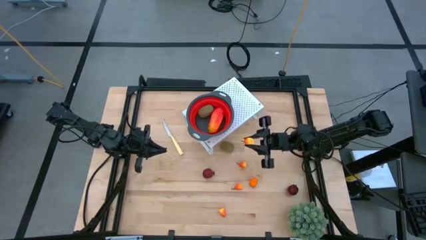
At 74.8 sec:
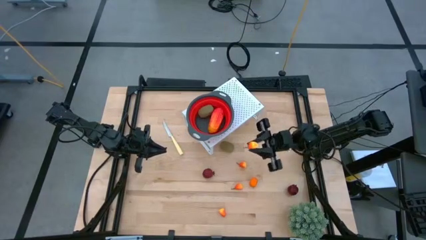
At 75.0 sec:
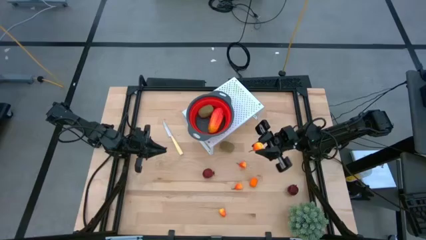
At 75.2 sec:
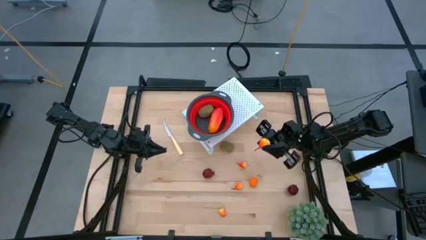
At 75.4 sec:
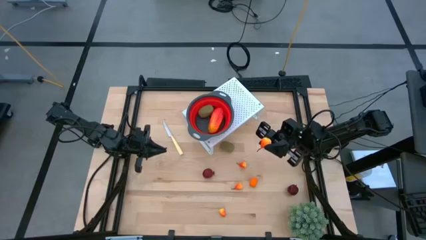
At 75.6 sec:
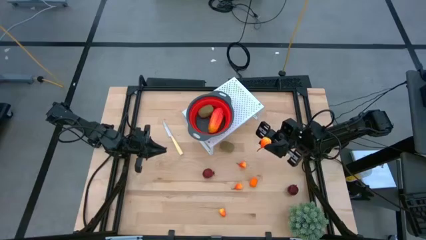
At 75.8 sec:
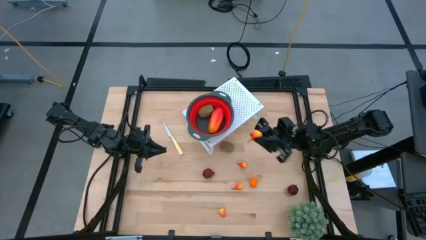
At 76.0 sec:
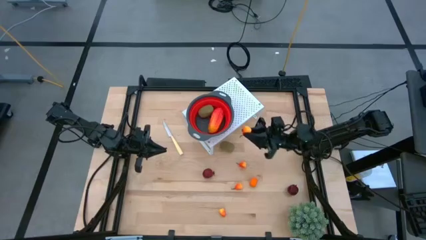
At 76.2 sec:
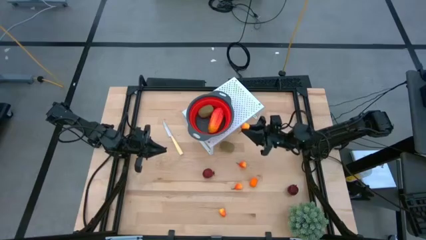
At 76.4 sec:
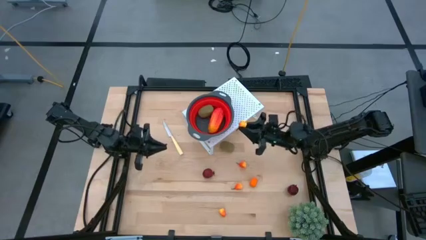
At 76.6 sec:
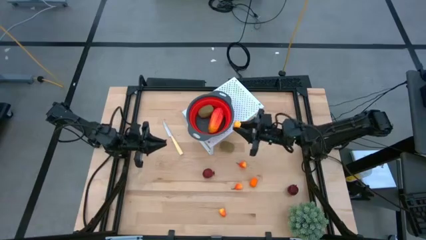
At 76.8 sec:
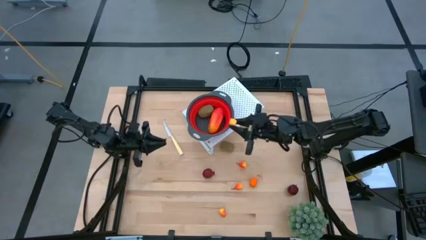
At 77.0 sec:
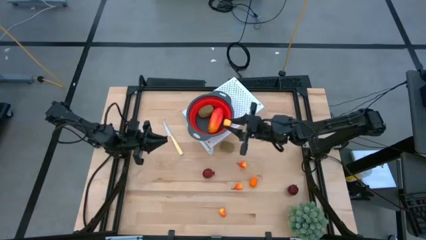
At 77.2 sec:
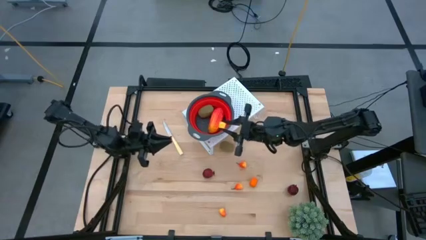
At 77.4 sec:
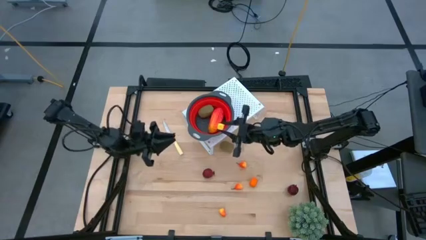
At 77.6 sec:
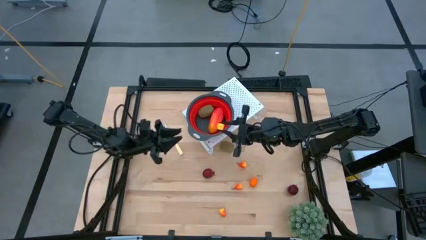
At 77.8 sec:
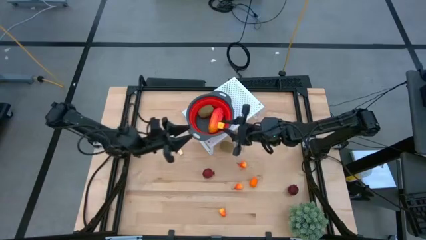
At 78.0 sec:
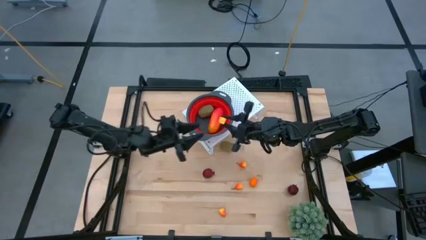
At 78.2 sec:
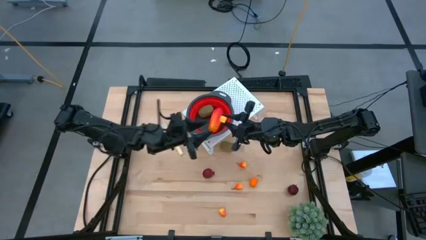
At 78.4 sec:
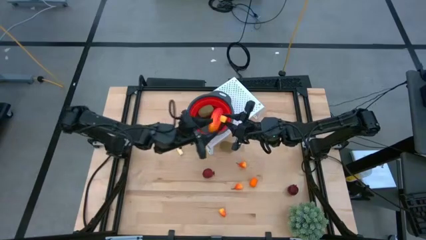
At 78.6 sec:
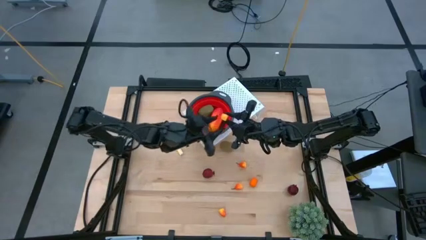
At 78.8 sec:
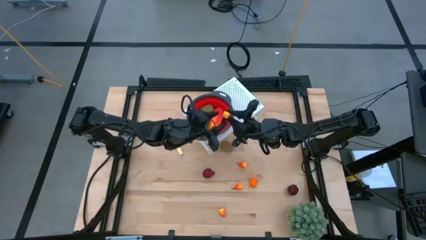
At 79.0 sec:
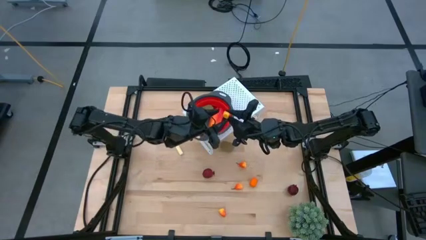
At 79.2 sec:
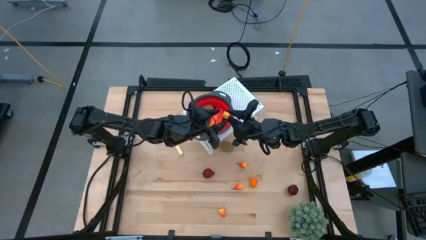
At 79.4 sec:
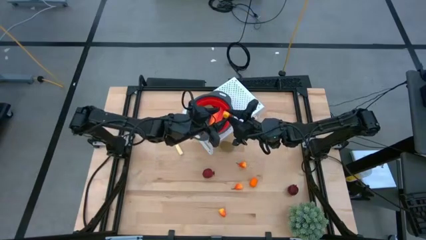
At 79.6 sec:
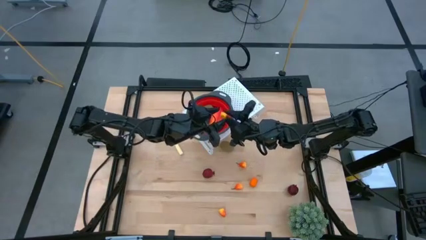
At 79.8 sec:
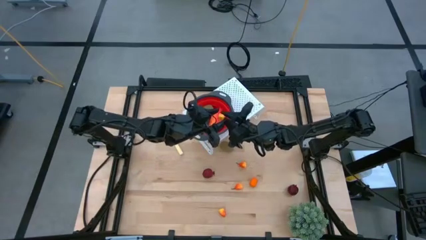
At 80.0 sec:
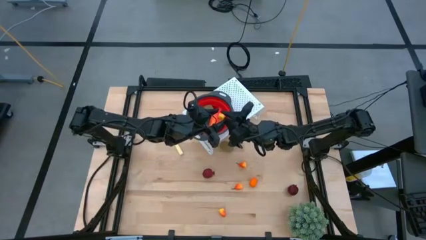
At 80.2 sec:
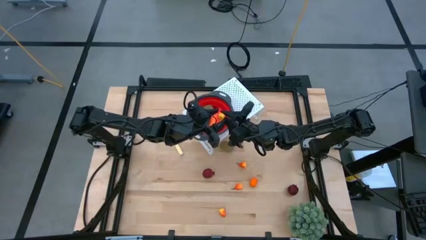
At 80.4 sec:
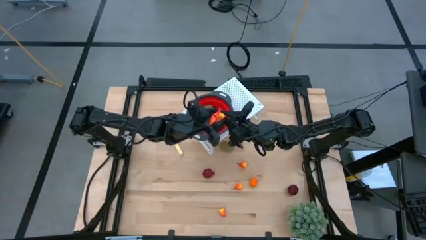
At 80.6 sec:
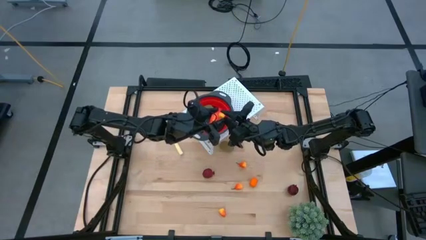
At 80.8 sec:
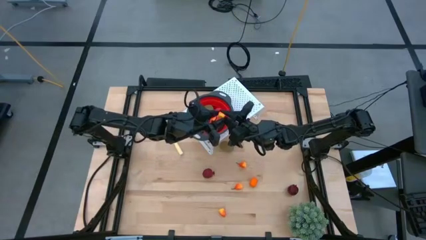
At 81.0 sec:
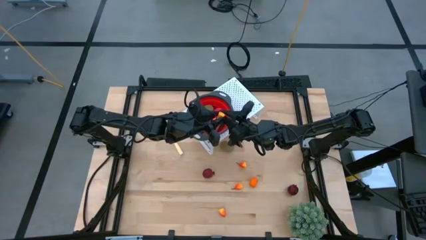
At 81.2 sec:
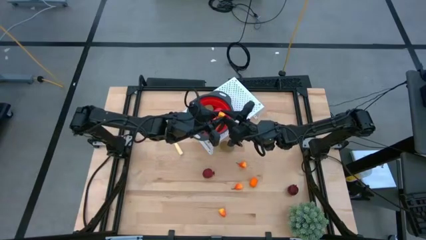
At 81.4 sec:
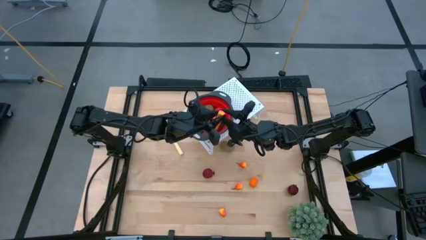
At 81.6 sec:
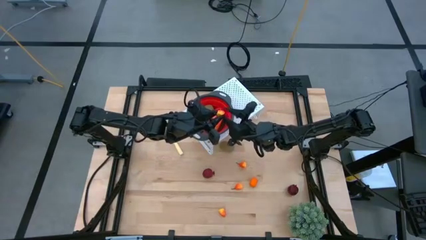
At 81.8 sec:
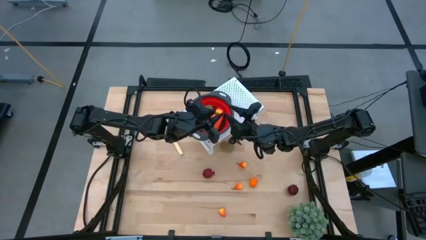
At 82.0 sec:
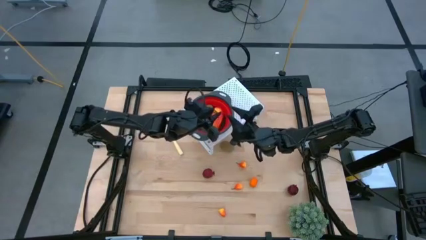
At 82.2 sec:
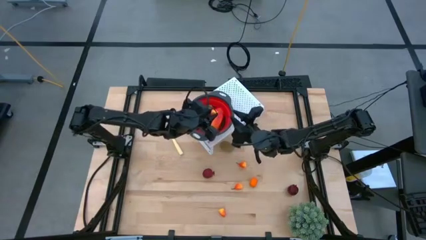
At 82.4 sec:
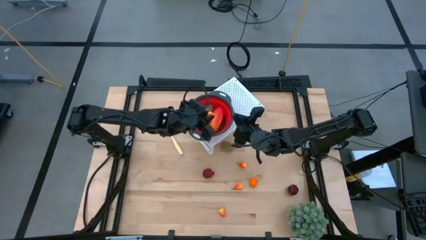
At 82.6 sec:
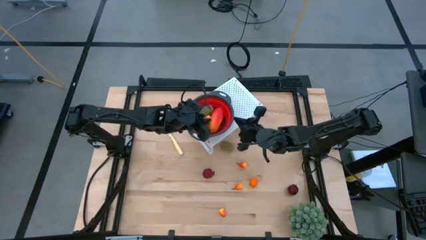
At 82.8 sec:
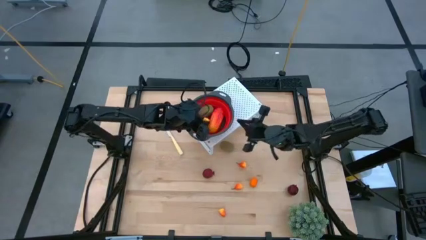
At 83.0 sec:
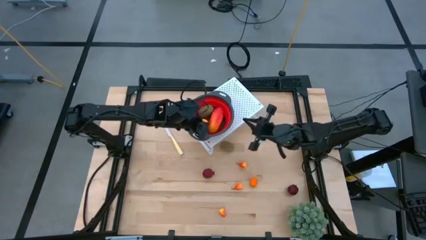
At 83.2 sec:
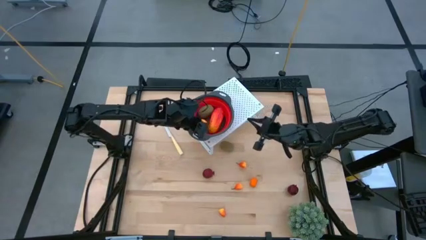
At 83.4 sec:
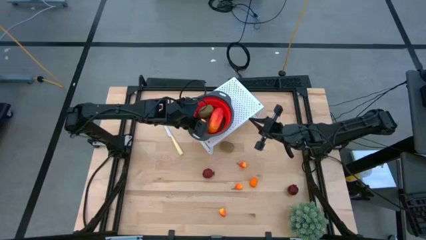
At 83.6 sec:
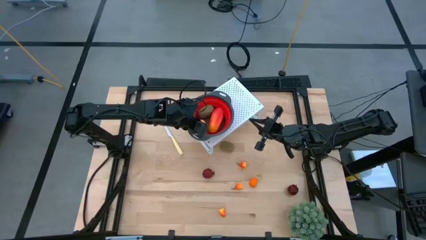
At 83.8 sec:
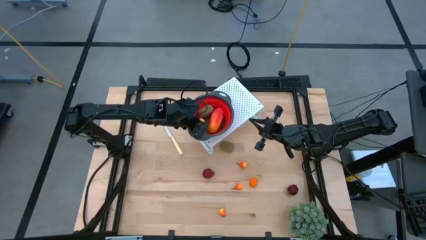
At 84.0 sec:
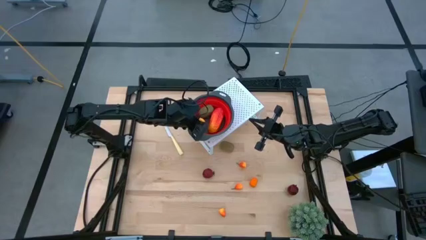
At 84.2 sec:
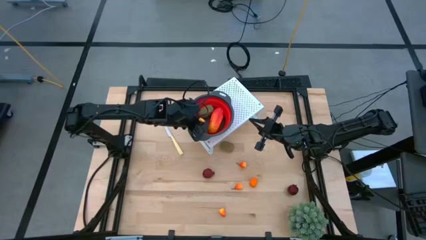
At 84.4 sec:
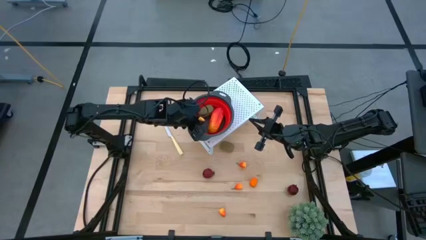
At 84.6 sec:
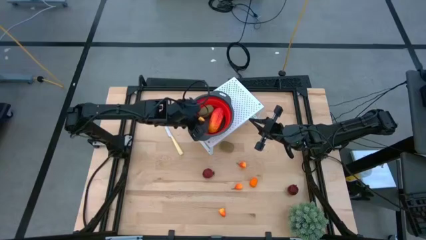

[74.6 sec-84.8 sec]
Task: Pick & Place Fruit
Put the peach into the red strainer bowl on the shelf
